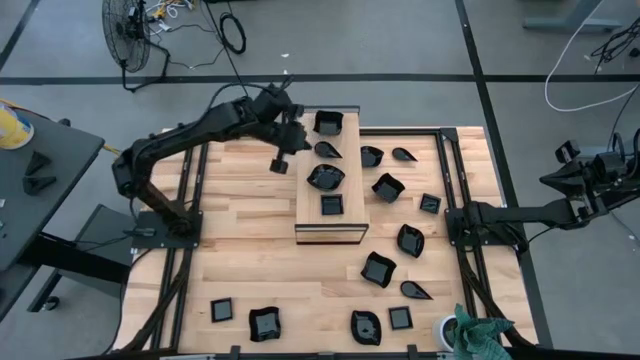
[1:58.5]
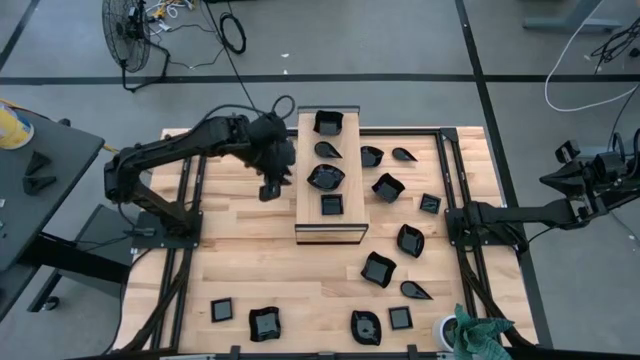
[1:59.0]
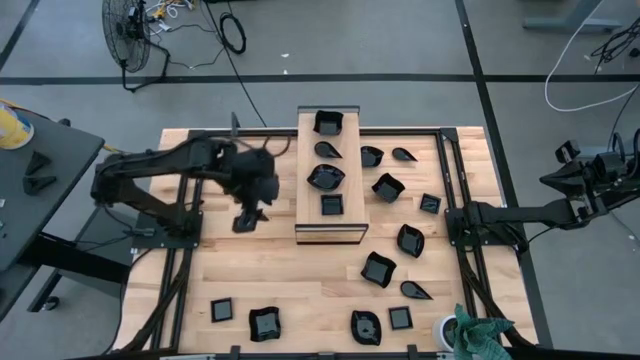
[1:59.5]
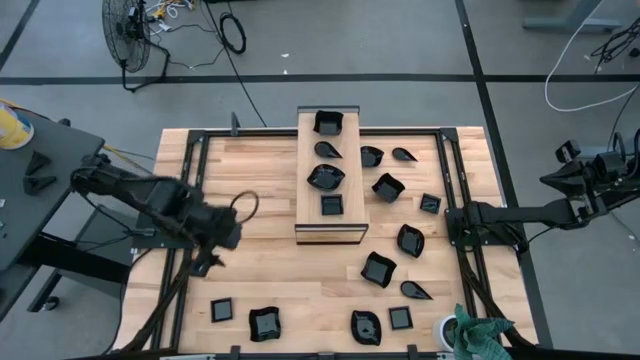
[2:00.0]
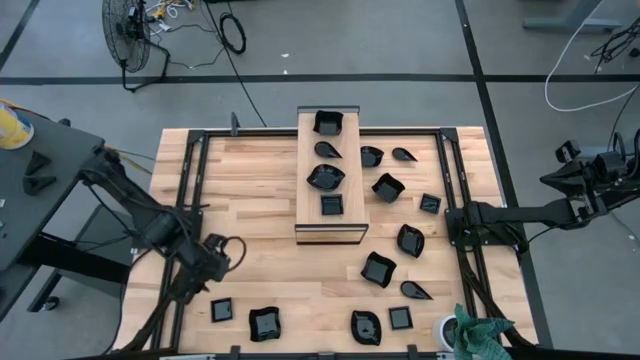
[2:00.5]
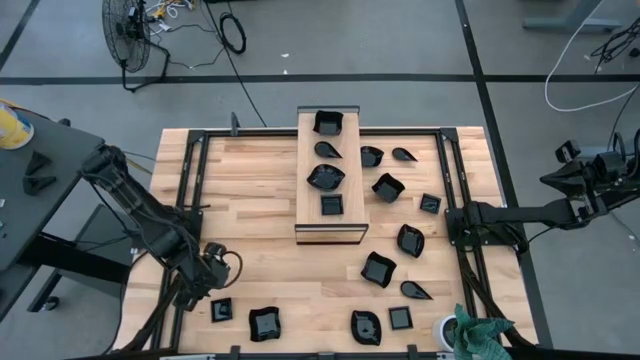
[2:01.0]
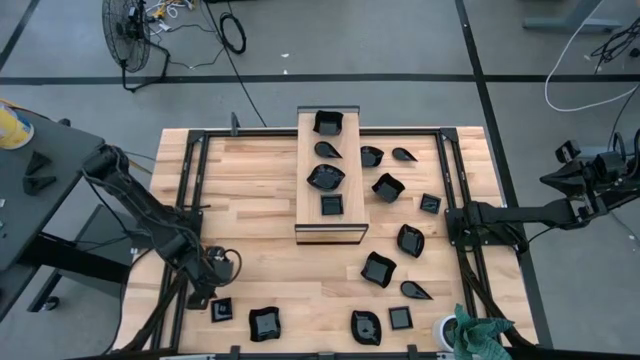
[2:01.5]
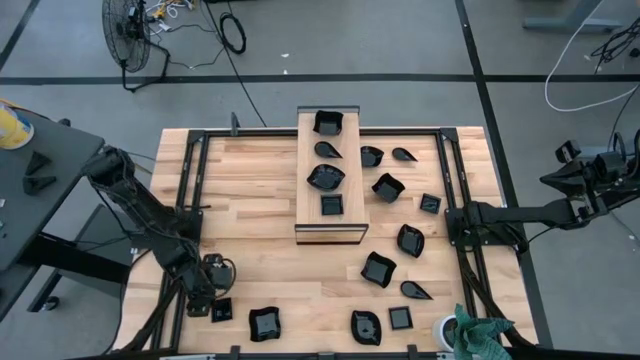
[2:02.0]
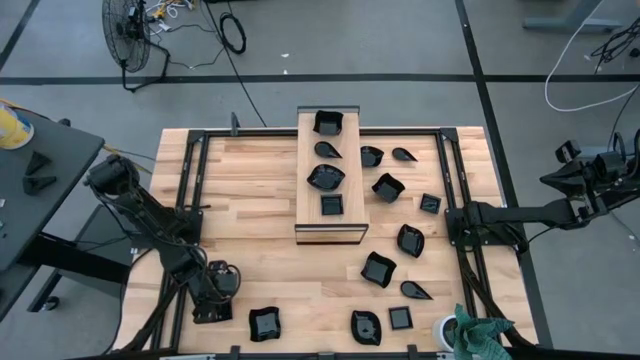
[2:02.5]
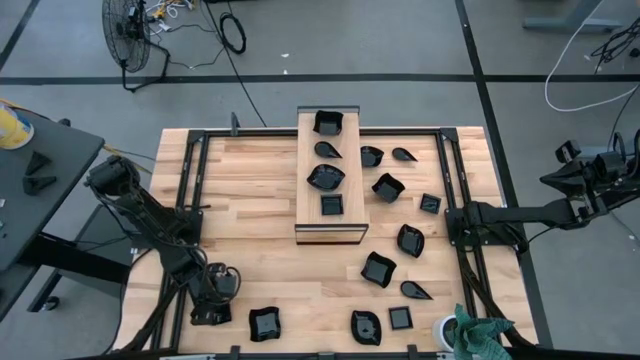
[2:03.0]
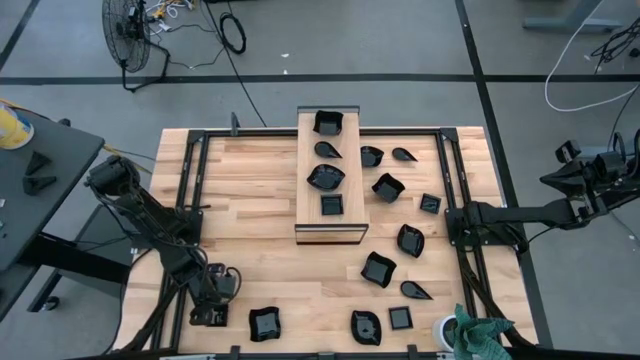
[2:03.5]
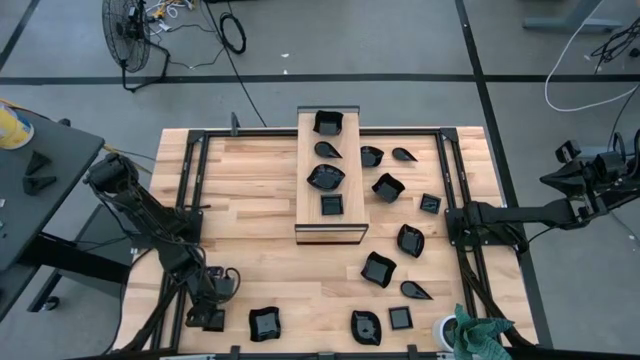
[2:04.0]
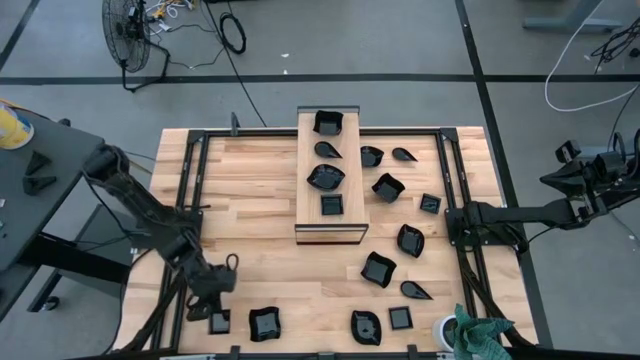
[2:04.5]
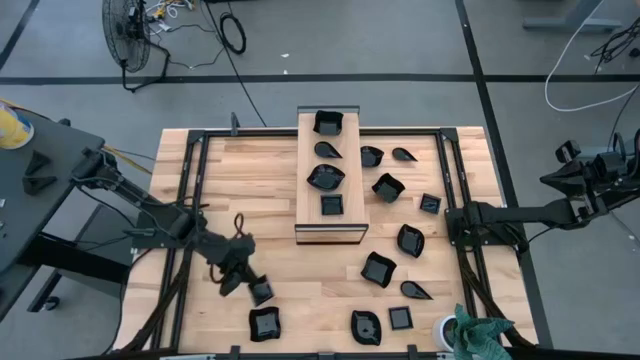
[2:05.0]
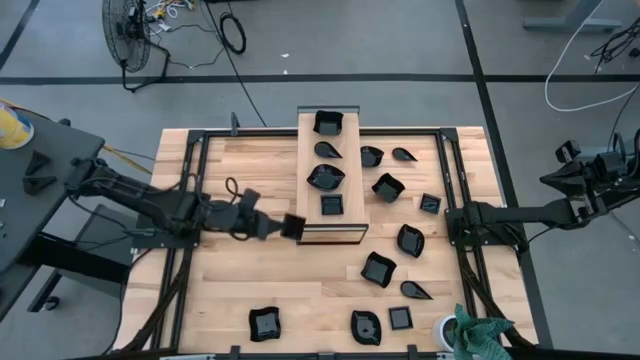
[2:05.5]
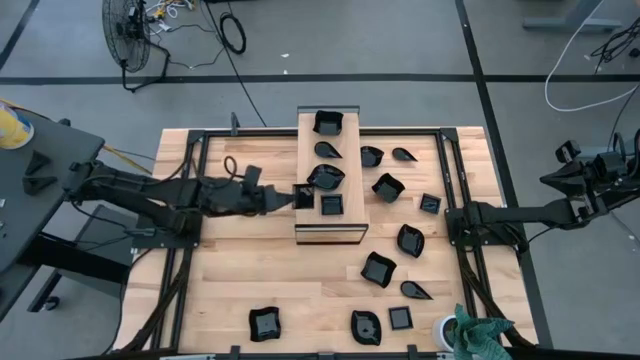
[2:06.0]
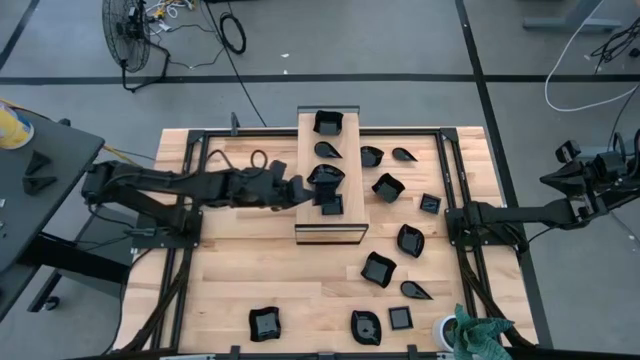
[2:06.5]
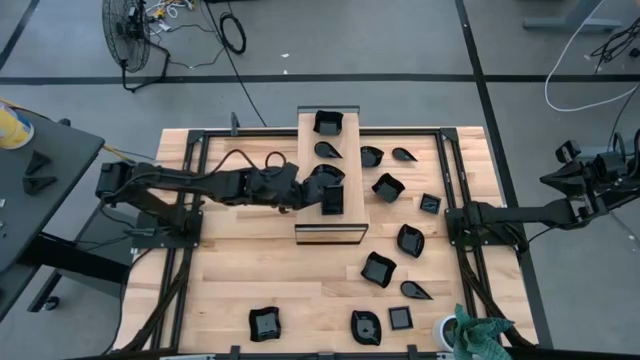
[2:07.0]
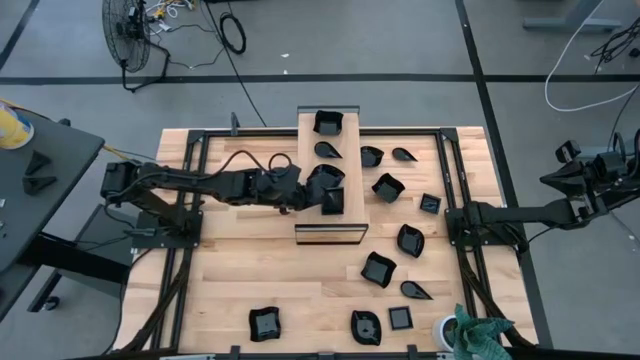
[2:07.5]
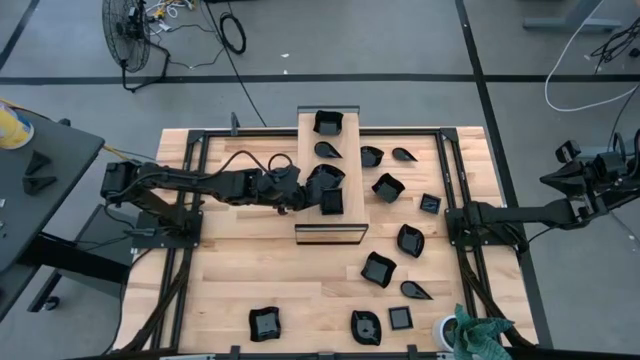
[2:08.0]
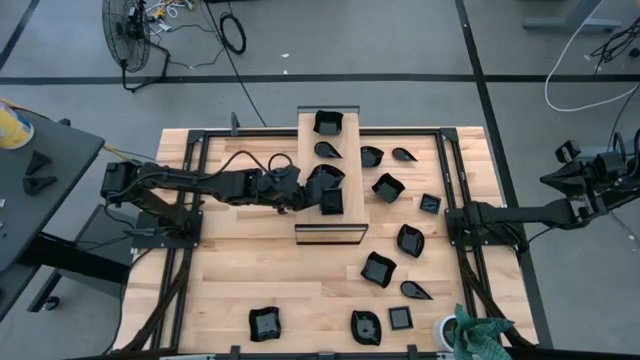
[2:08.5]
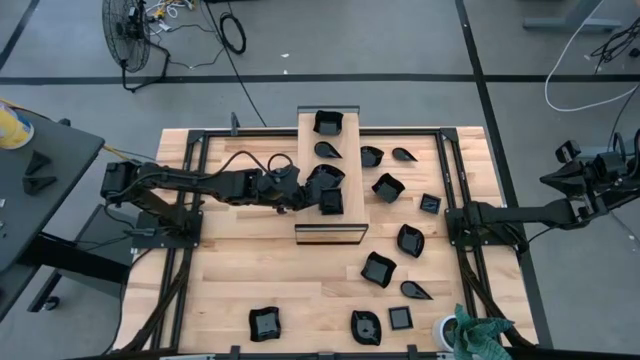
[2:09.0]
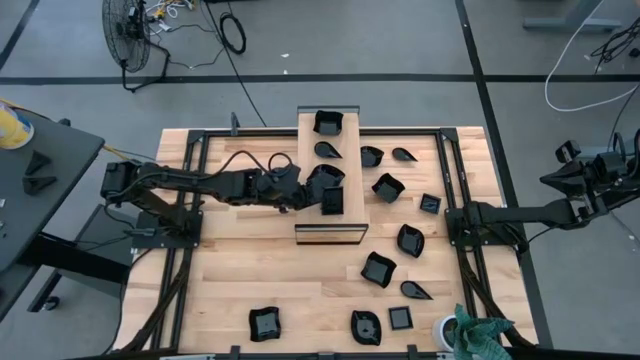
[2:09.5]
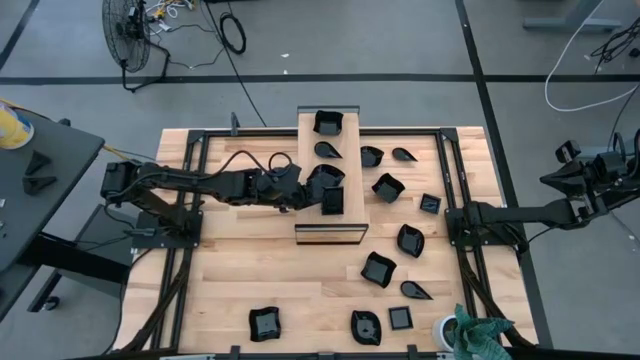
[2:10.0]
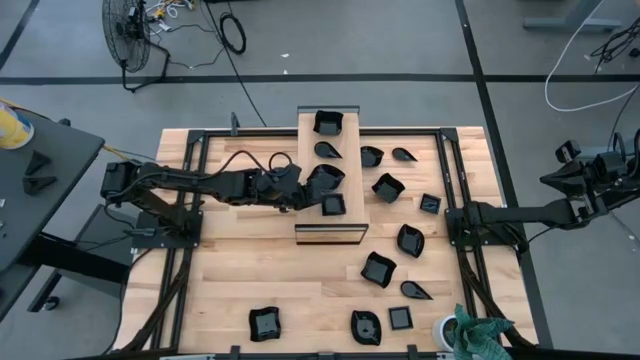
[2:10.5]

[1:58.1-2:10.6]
Task: Pick & Place Mini shaped plates
Stack the square plate on top of the square plate on the shelf

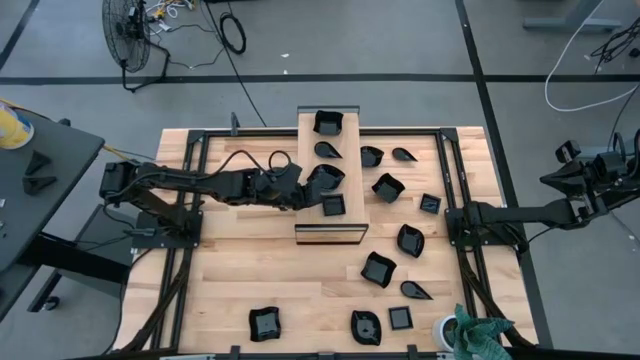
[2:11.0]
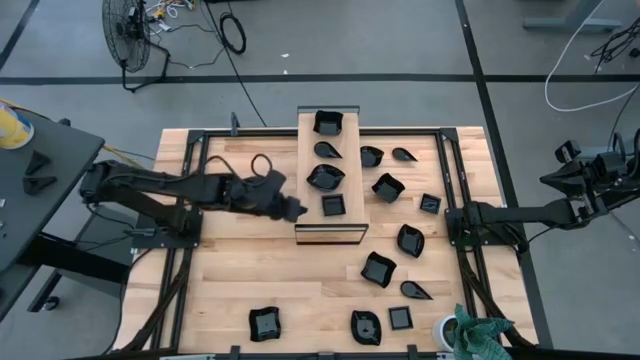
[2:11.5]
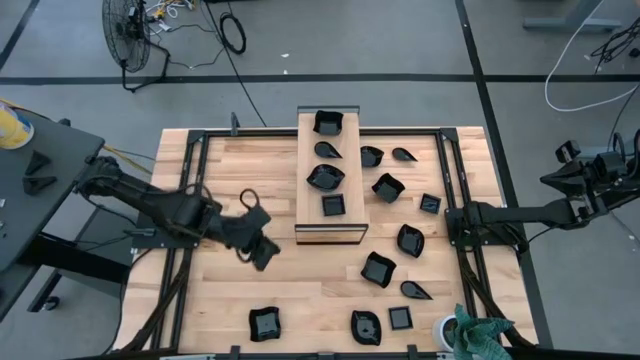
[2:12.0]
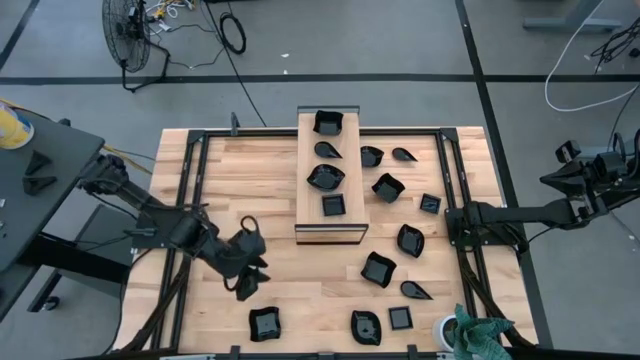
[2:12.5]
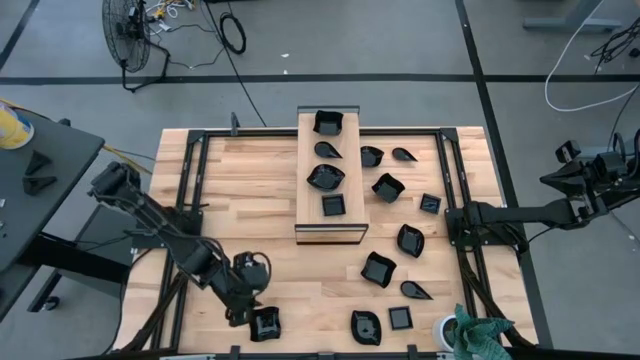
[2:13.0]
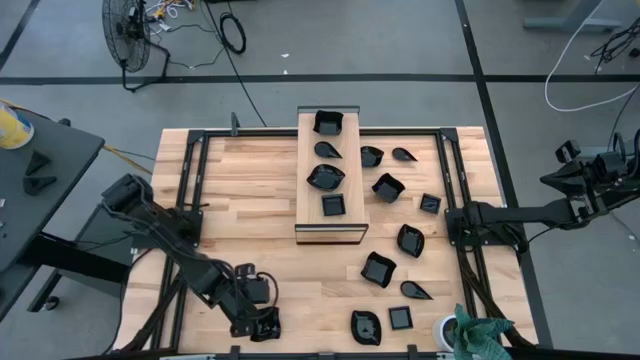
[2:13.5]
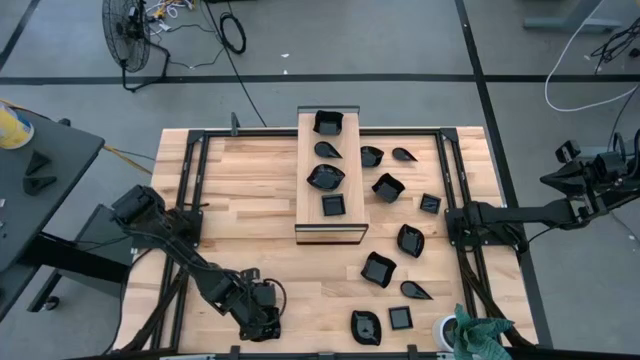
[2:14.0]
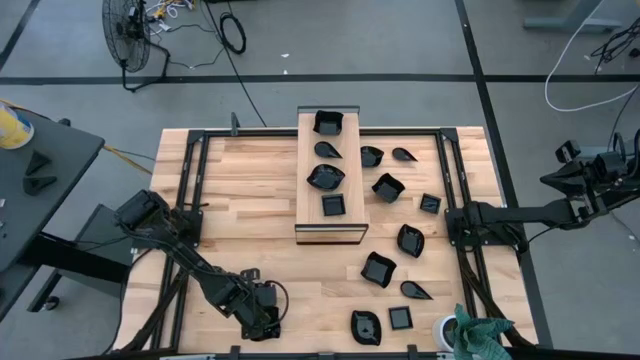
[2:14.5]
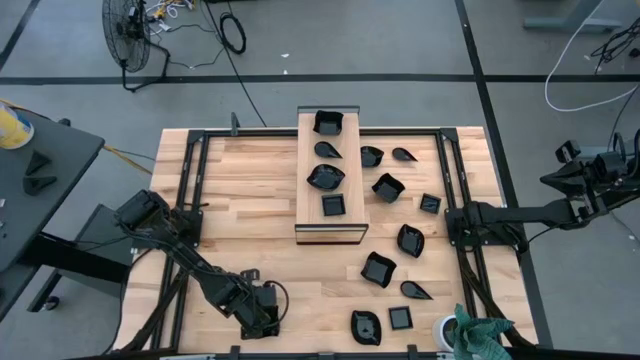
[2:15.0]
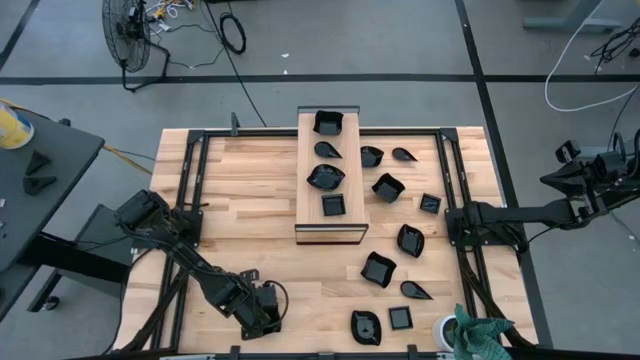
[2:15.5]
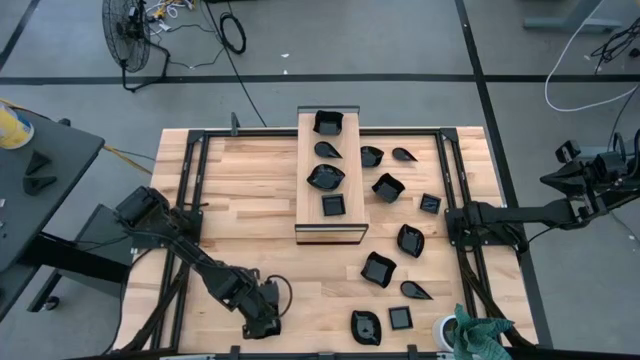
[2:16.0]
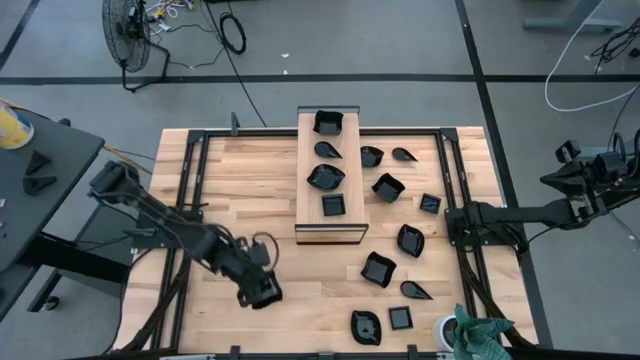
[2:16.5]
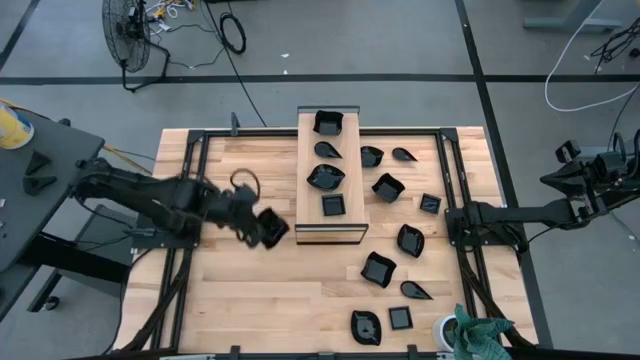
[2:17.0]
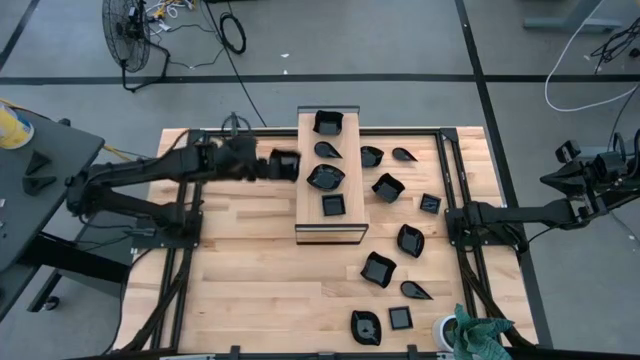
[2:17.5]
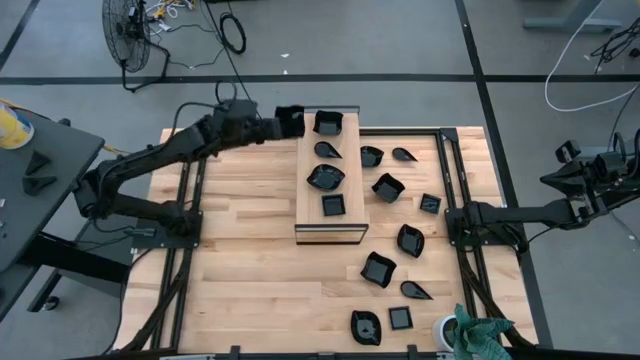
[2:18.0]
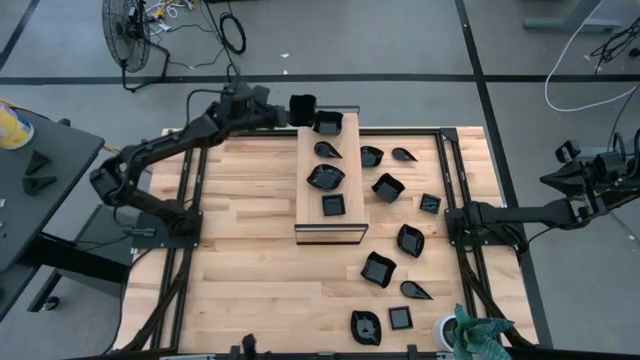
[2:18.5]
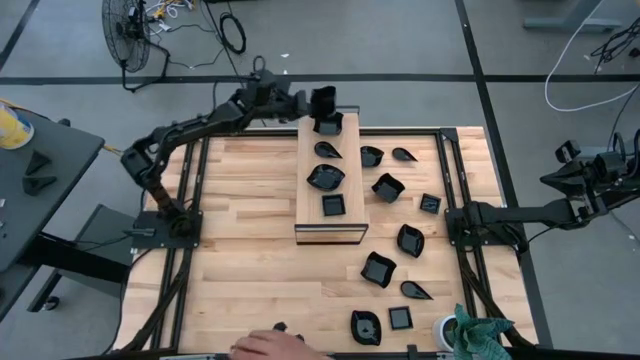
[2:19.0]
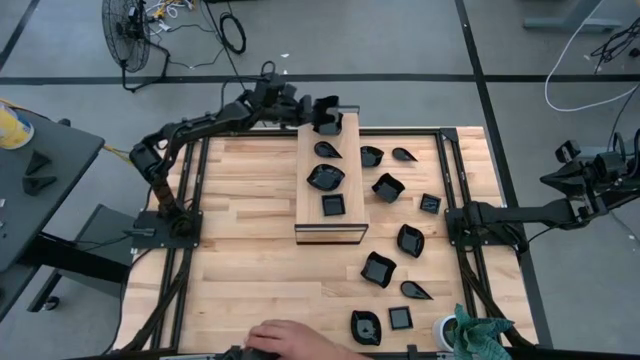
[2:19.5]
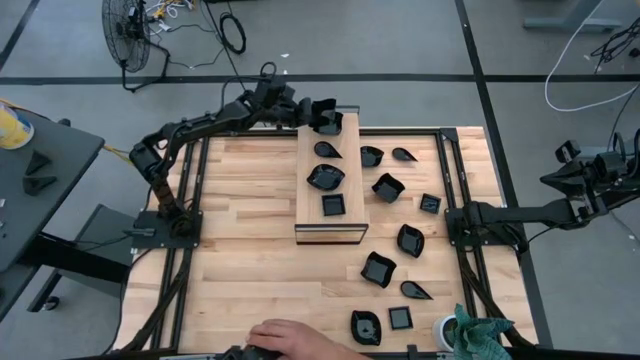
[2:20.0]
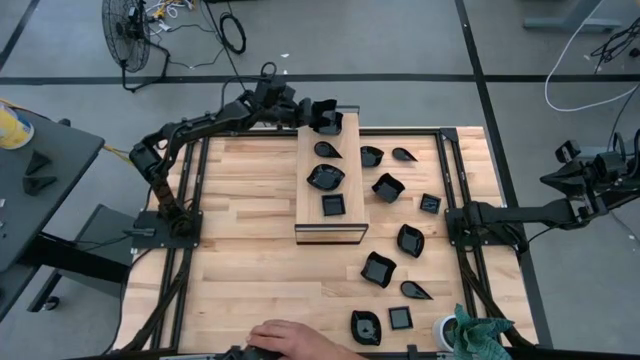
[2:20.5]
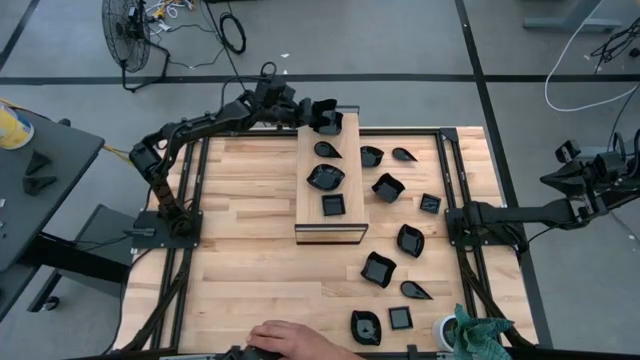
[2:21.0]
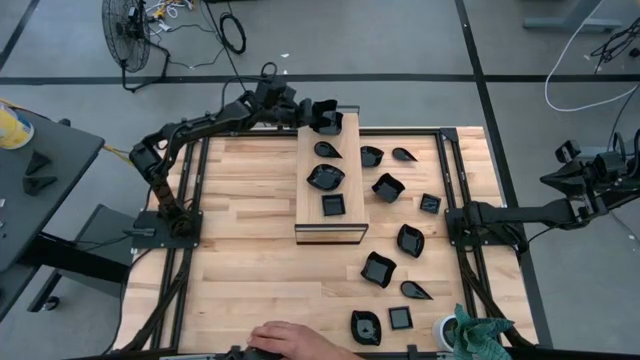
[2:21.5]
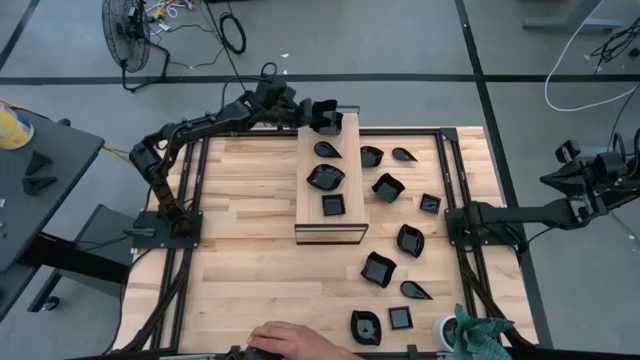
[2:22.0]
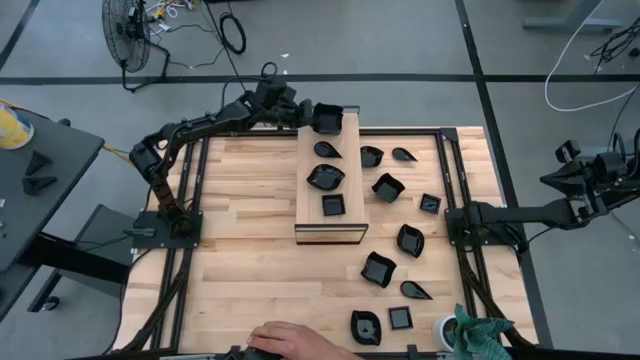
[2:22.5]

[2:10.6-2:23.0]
Stack the distorted square plate on top of the distorted square plate on the shelf
